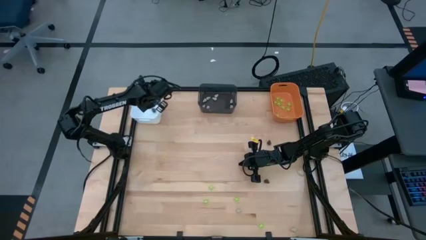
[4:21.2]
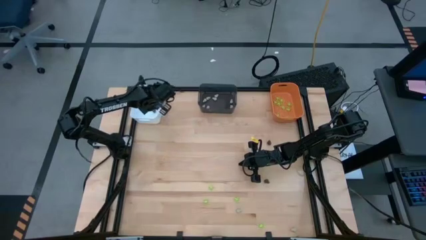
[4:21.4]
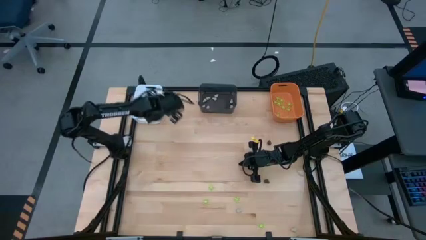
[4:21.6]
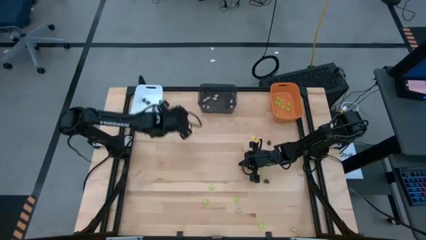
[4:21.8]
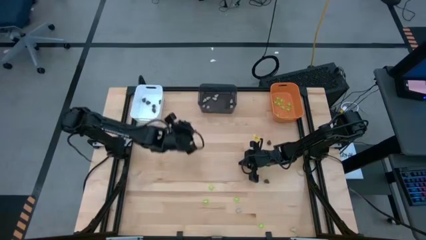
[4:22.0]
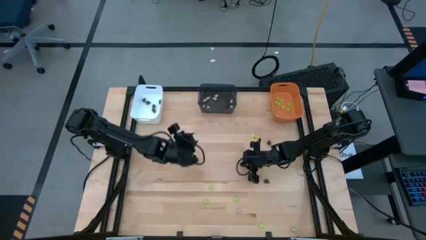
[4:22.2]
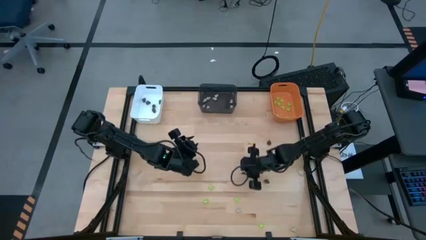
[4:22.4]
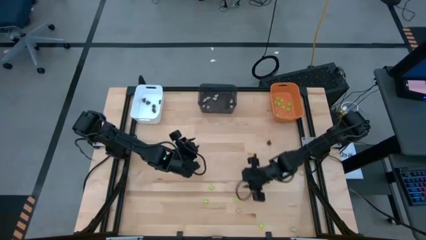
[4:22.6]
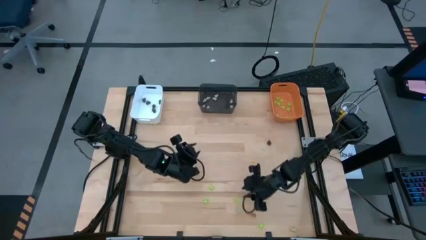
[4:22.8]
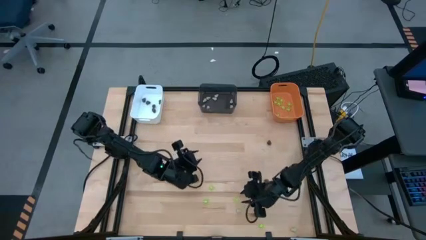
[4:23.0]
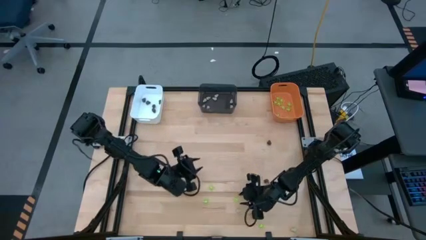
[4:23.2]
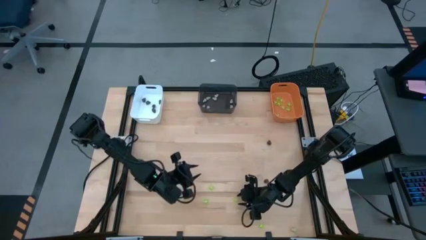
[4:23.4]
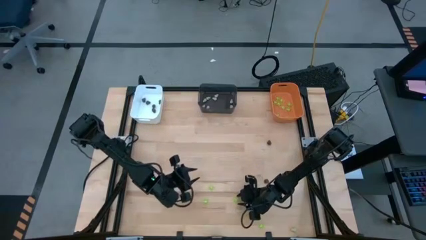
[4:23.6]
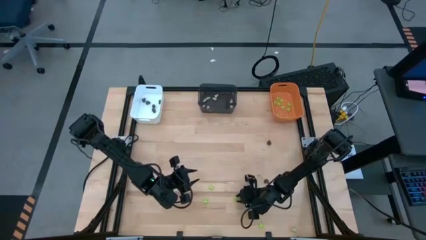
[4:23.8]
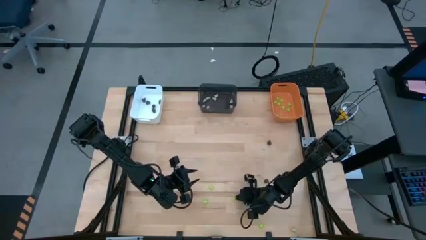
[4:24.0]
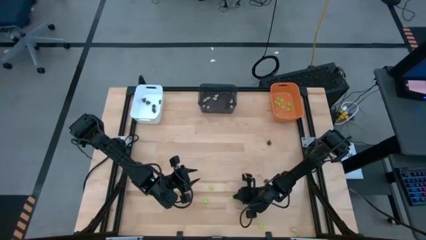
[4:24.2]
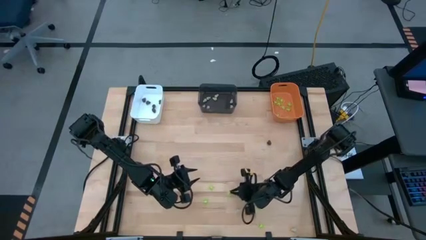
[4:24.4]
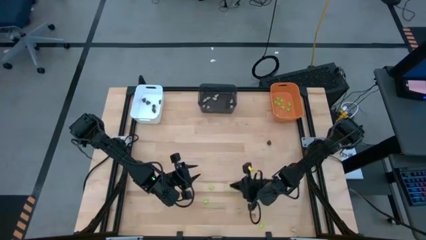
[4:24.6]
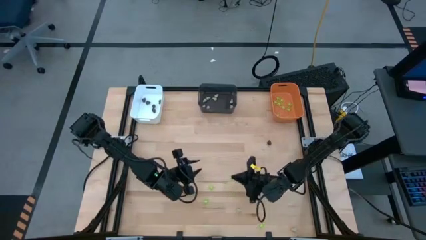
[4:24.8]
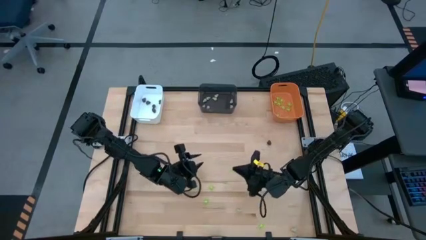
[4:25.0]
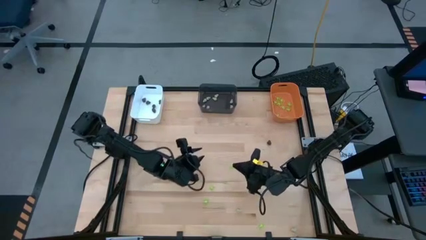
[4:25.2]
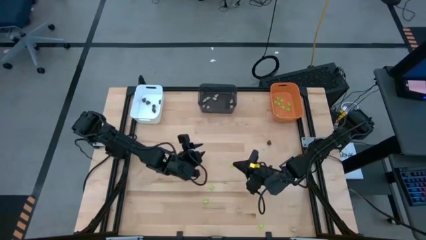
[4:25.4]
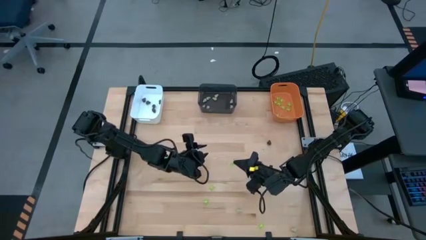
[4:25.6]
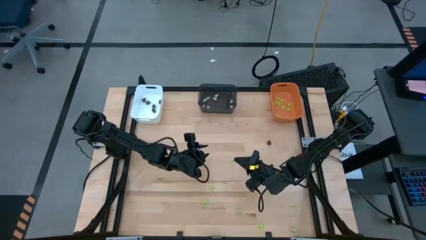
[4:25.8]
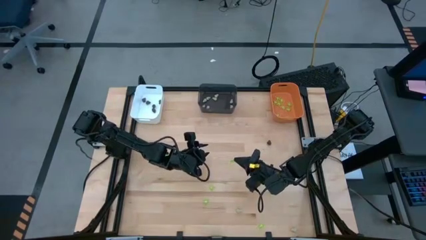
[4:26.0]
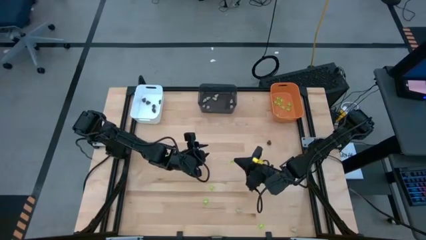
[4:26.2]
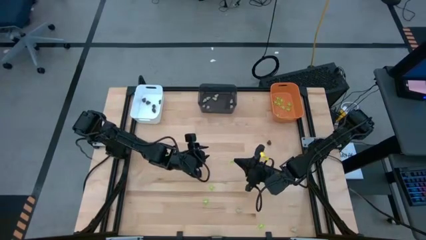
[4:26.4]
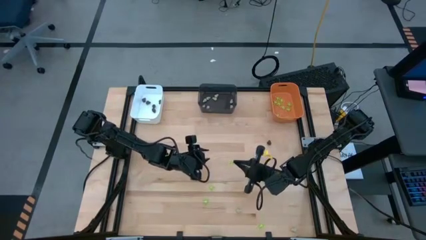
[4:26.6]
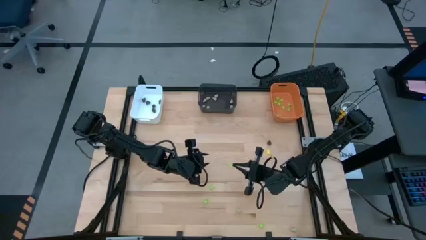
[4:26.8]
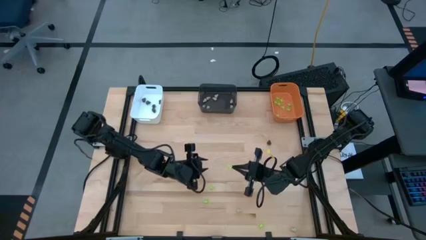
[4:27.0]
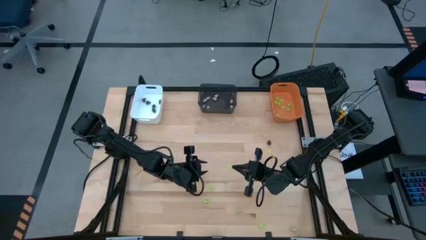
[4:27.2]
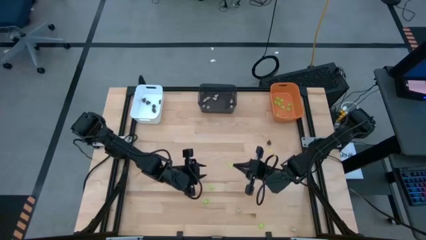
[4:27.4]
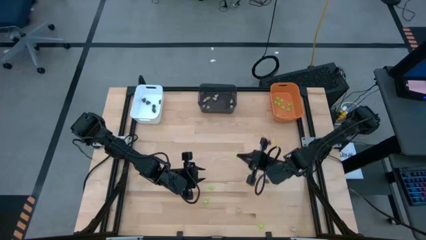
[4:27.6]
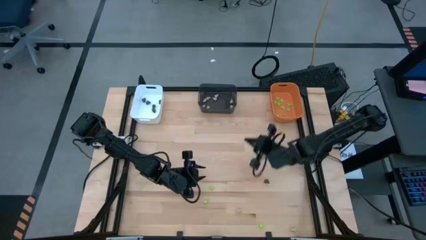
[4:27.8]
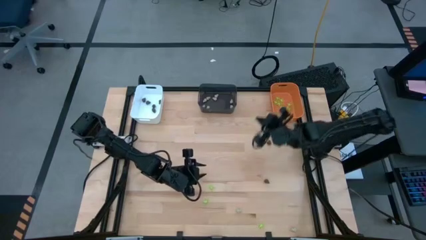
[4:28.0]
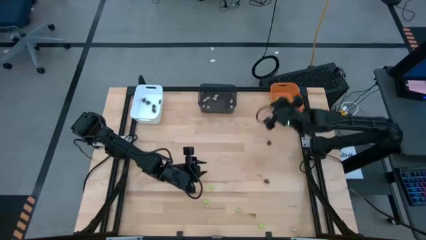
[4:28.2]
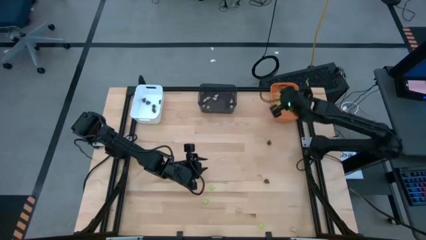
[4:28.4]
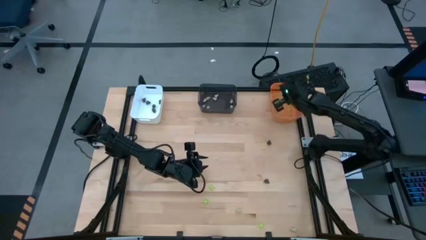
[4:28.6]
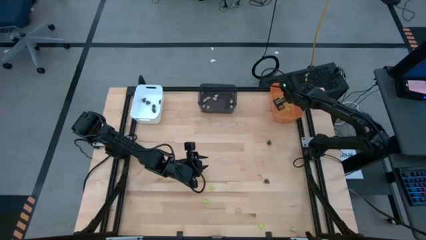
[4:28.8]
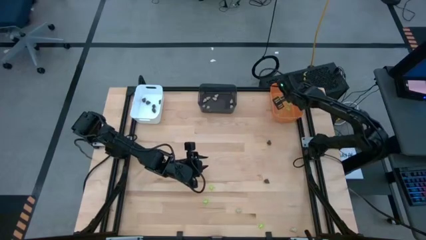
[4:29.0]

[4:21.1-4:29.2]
Task: Sort Halloween decoration
Put the green toy spider into the orange bin

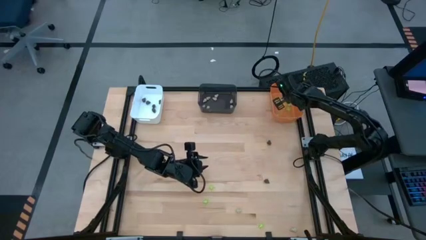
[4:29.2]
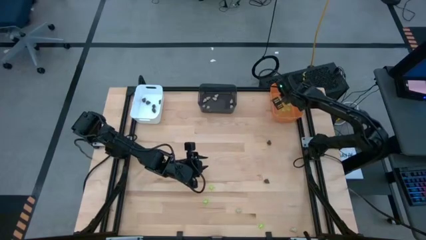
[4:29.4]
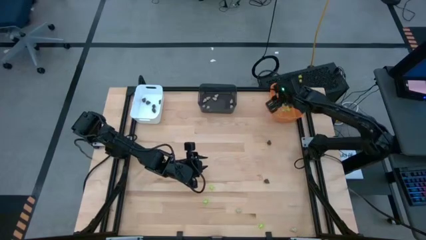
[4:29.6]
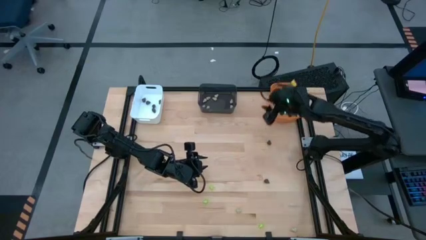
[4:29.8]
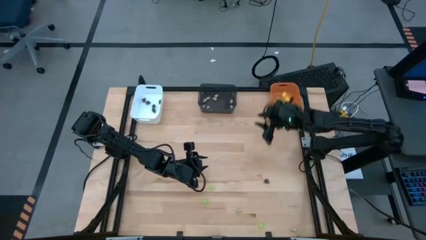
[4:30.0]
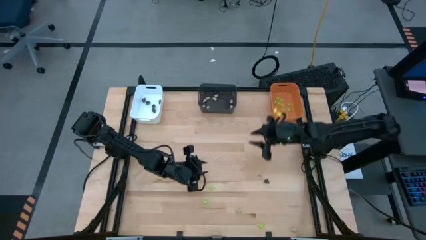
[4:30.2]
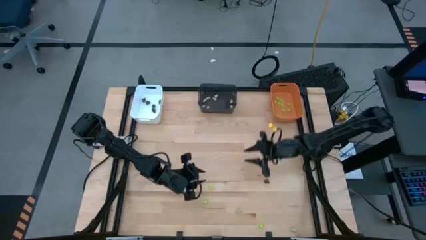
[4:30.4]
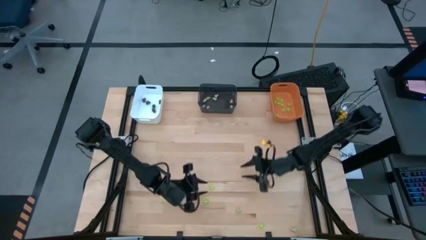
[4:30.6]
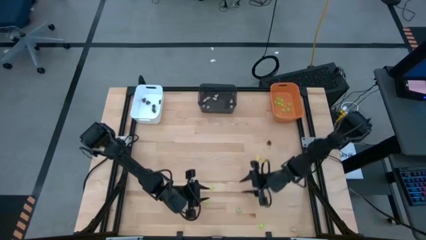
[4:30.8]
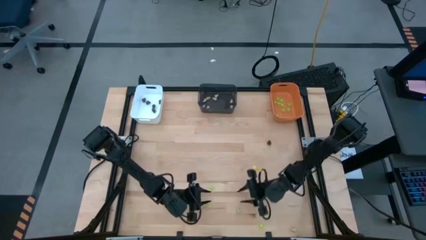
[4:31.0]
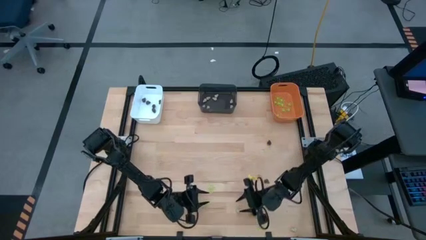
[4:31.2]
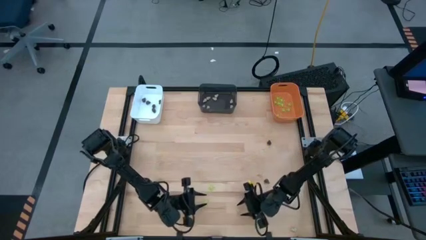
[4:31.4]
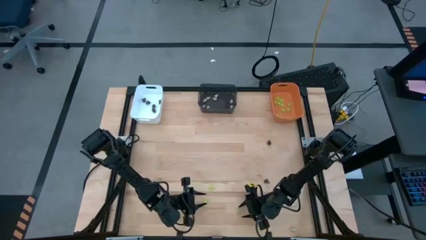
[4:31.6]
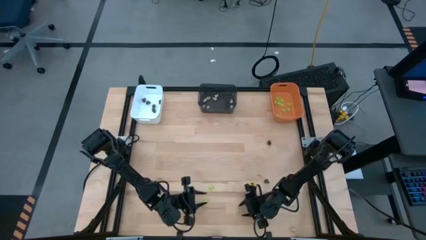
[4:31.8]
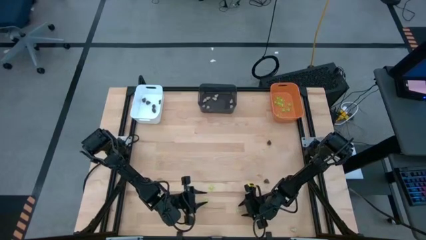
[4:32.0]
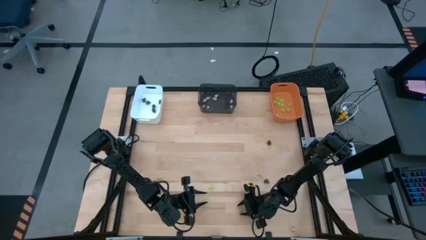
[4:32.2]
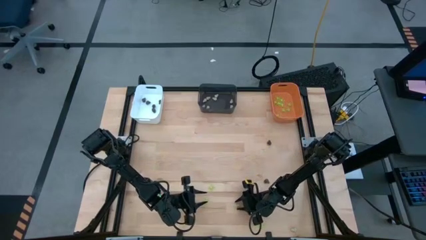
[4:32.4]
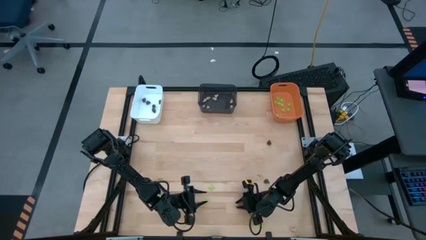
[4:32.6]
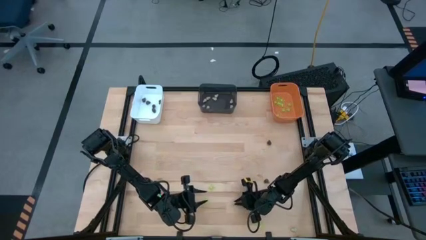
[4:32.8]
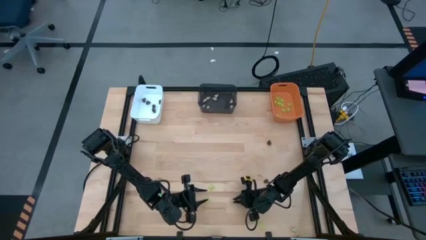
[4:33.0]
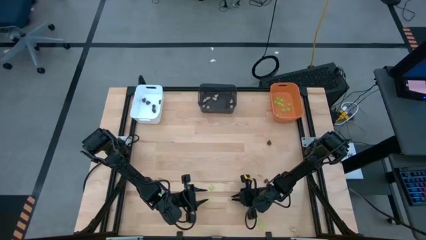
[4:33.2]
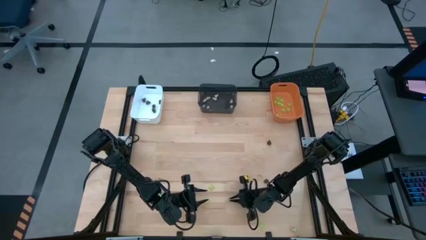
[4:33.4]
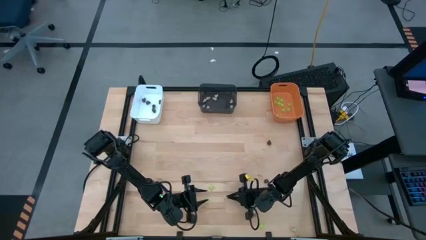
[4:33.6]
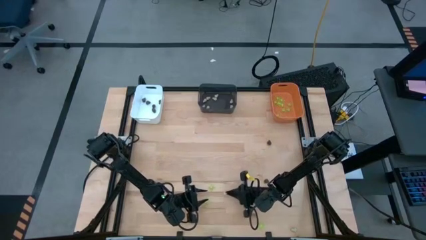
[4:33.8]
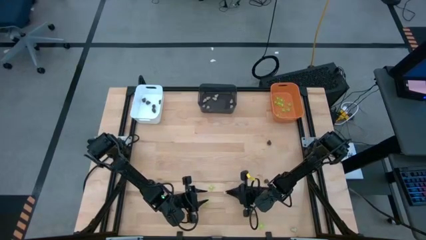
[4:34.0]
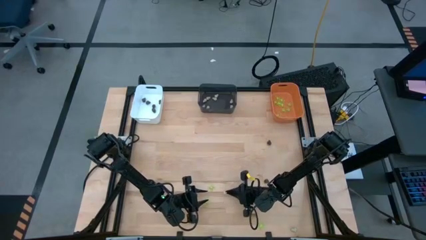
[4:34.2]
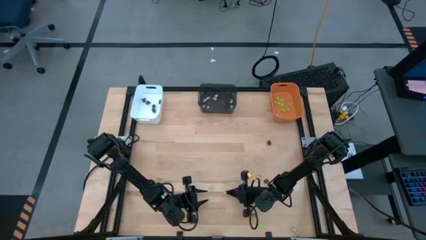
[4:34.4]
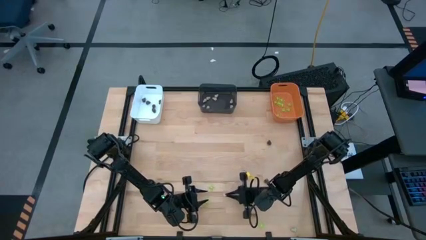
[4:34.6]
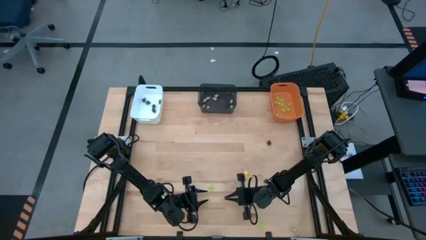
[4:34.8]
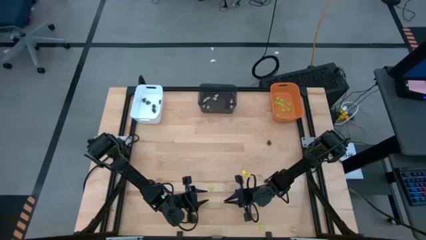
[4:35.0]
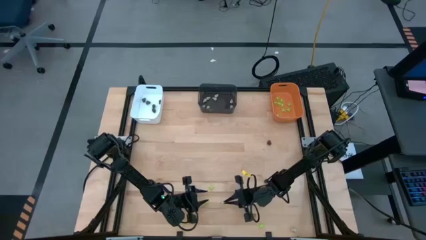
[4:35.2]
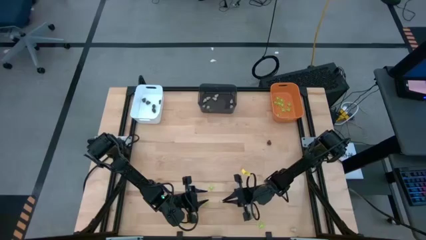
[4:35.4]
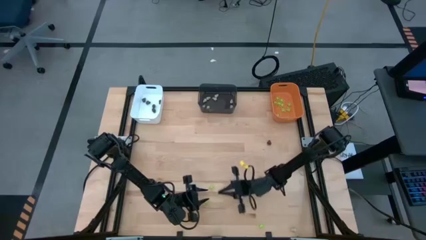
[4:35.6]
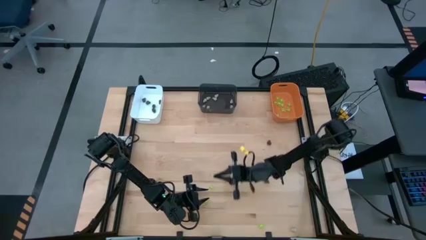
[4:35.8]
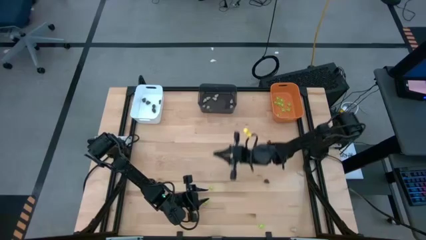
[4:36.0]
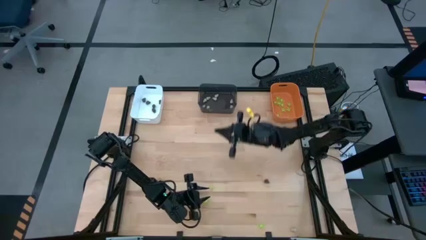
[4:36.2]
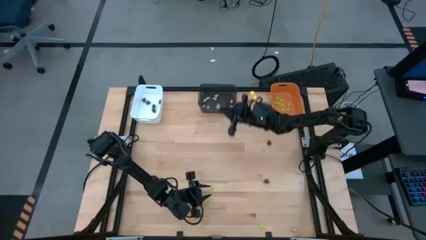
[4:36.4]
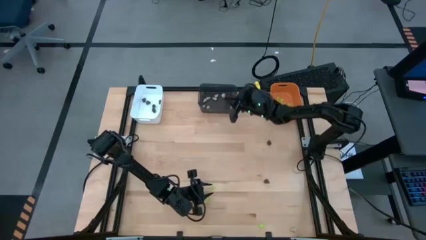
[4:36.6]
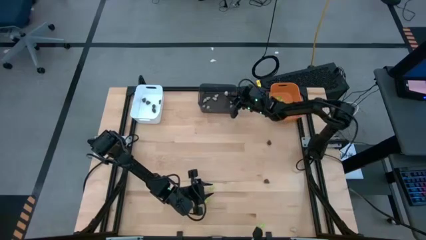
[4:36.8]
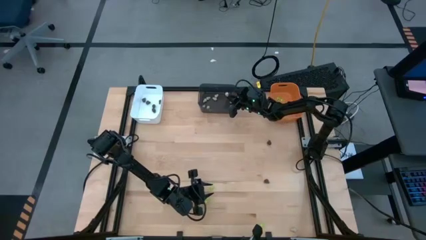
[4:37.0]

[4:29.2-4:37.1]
Put the white toy skull into the black bin
